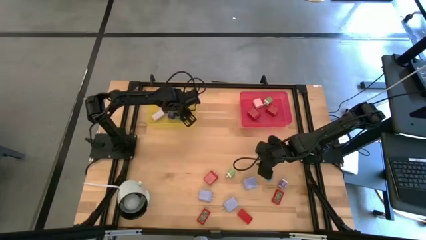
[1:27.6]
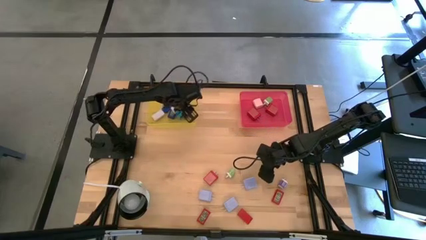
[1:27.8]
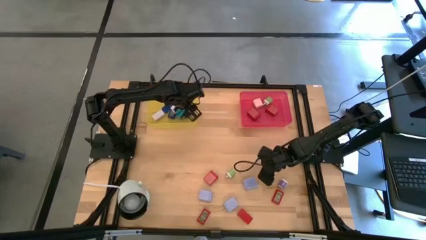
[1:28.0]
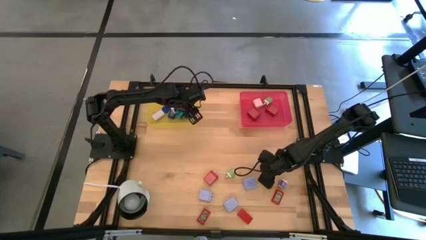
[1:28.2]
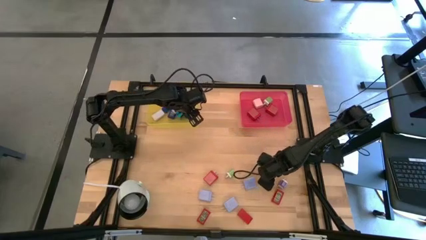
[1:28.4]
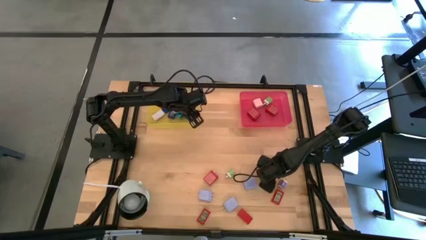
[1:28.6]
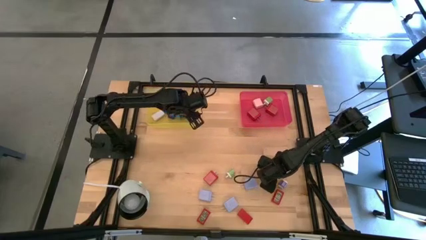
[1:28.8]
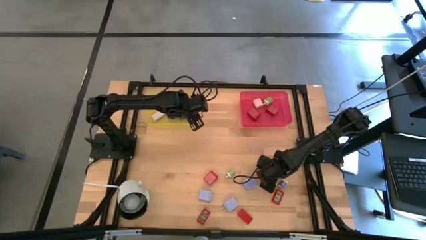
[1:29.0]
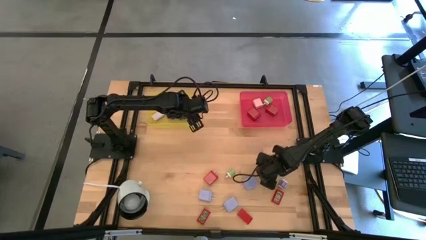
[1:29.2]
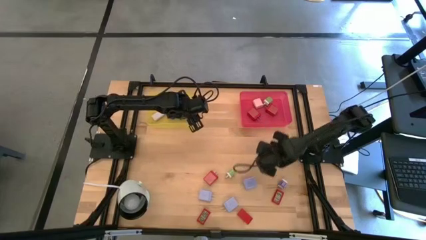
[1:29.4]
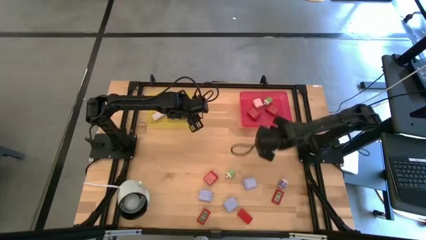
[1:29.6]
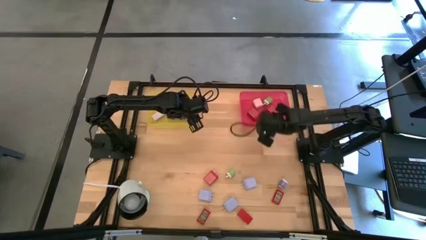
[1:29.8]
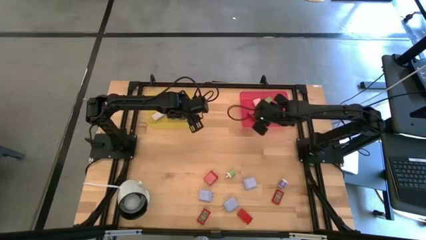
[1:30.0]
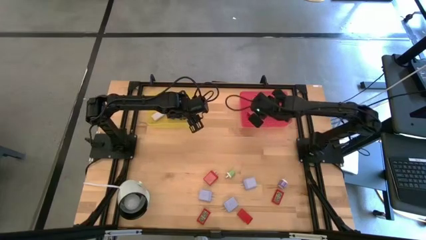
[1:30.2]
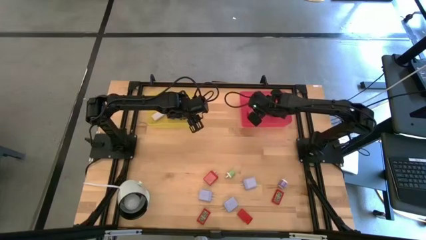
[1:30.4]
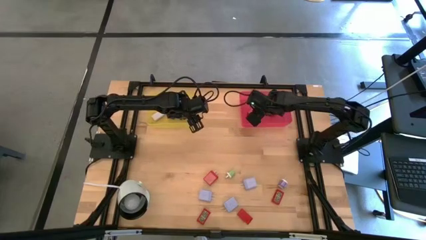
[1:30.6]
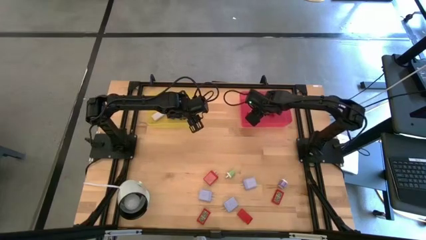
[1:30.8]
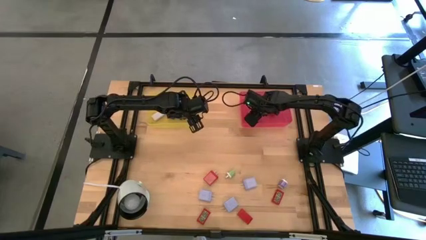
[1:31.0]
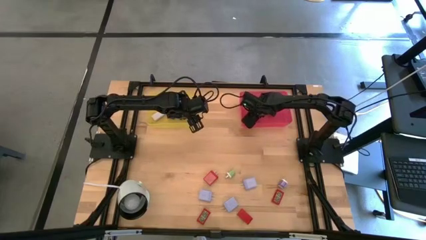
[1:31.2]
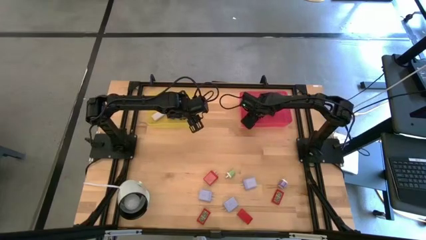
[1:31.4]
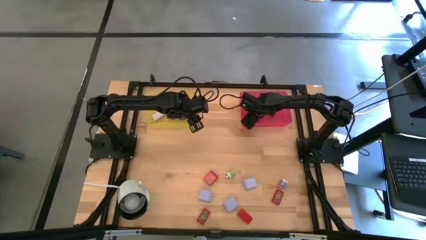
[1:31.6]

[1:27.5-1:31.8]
Task: Pick & Place Office items
Put the blue charger adapter into the red bin

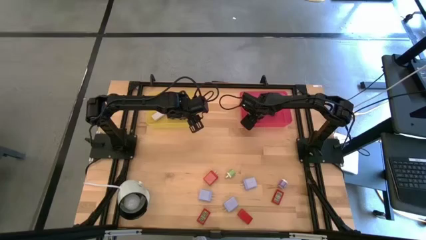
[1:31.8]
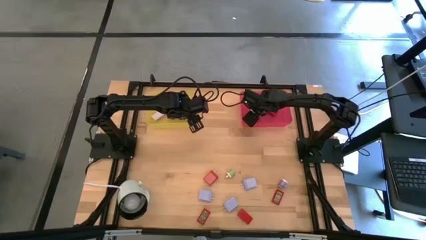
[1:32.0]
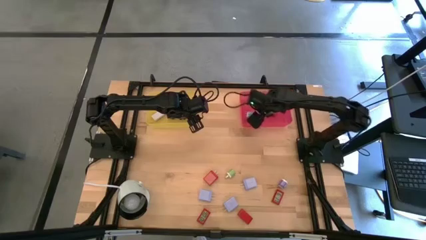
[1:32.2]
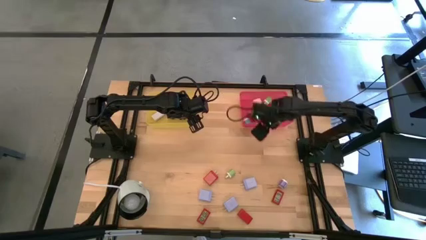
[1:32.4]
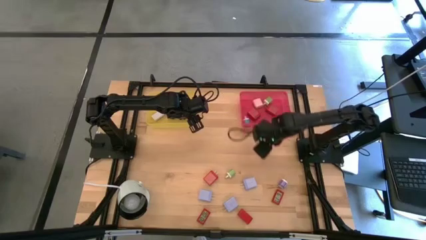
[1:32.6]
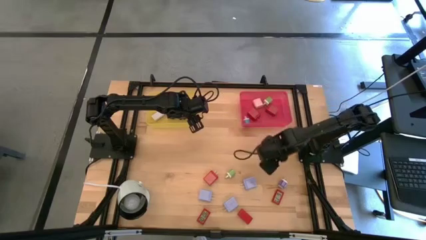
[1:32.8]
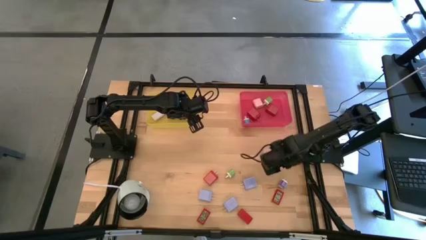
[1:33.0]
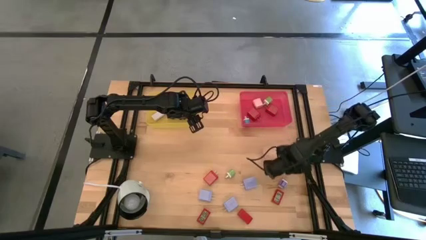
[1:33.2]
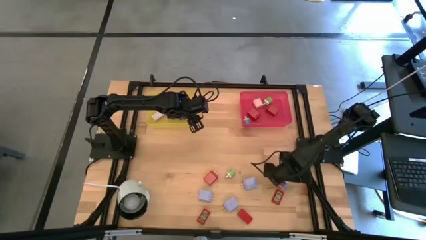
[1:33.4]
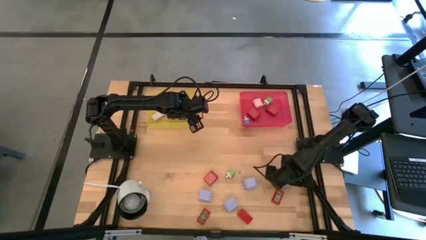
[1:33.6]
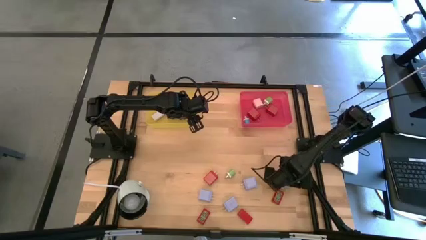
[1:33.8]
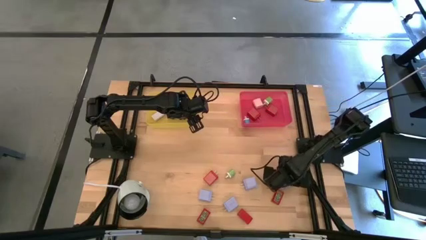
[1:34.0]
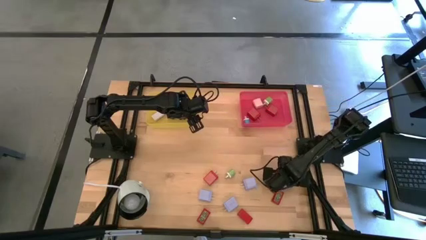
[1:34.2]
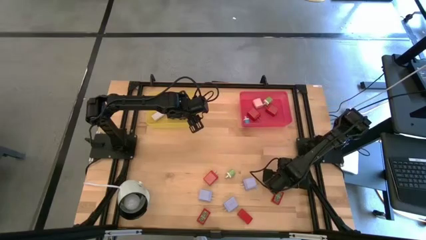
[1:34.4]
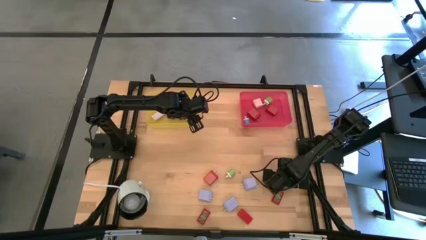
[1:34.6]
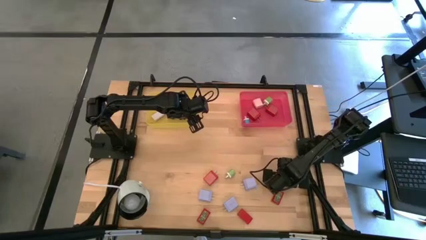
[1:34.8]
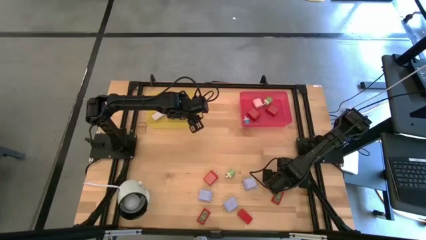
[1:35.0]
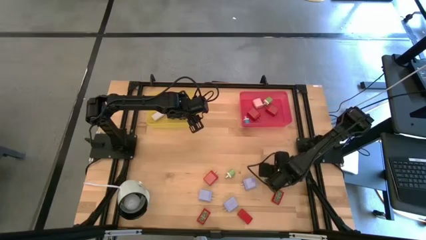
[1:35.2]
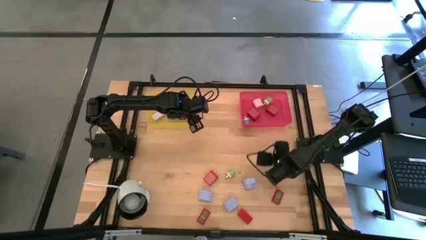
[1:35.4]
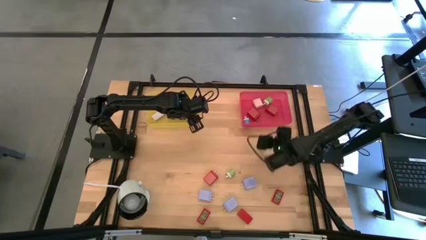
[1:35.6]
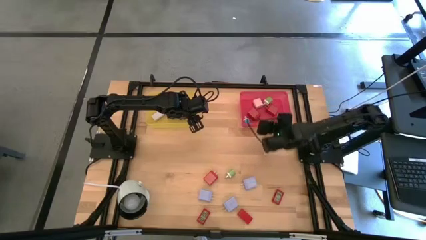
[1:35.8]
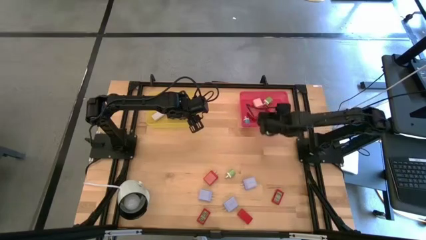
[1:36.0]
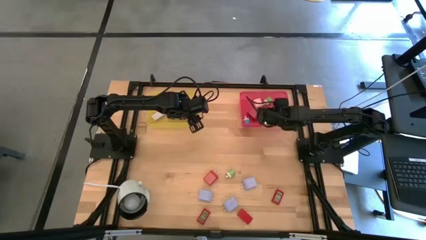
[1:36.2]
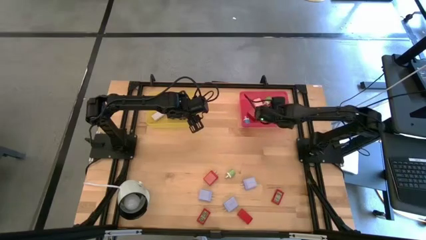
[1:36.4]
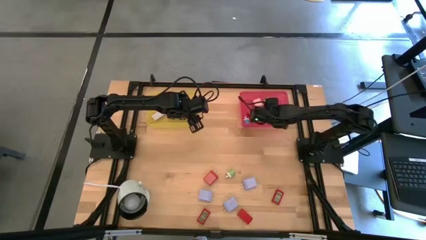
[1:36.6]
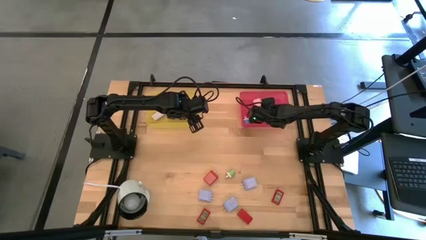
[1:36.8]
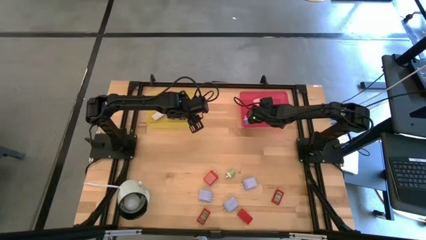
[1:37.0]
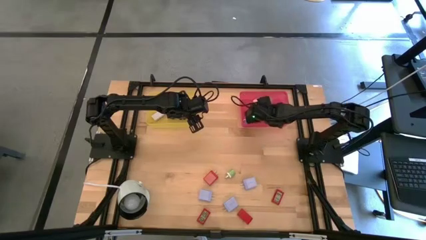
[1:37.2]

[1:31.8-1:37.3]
Put the violet charger adapter into the red bin

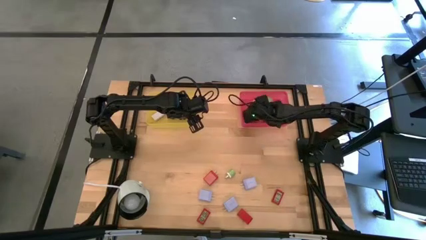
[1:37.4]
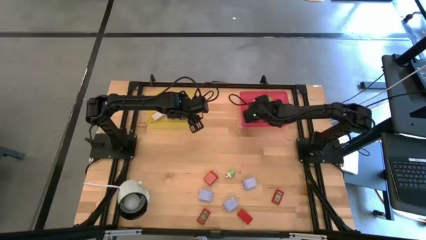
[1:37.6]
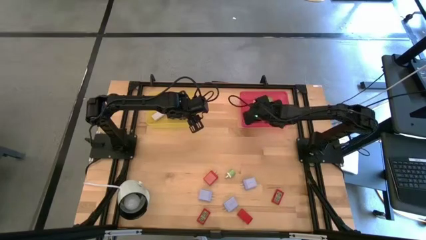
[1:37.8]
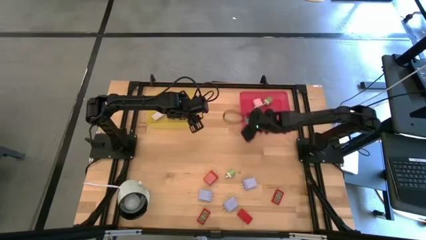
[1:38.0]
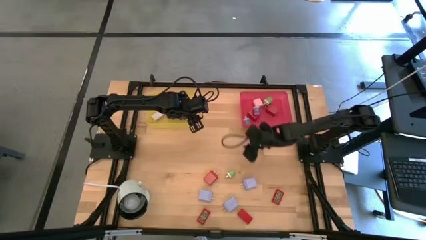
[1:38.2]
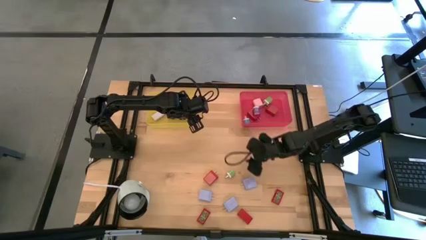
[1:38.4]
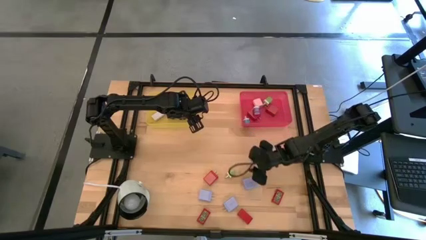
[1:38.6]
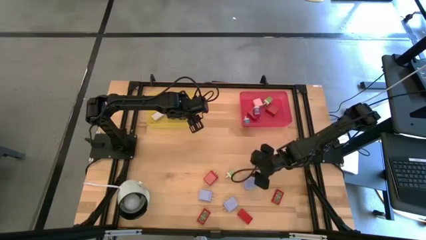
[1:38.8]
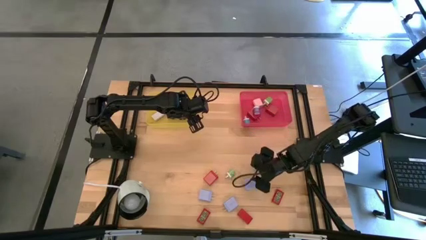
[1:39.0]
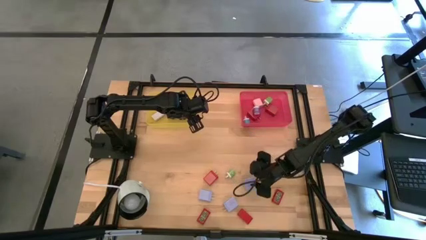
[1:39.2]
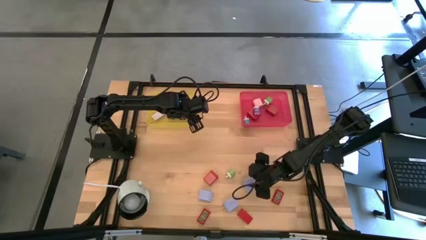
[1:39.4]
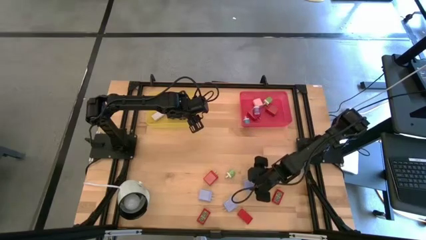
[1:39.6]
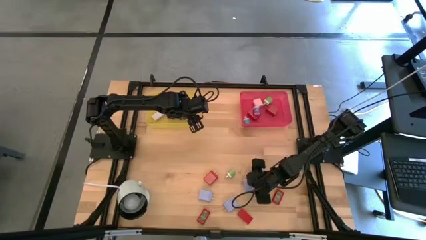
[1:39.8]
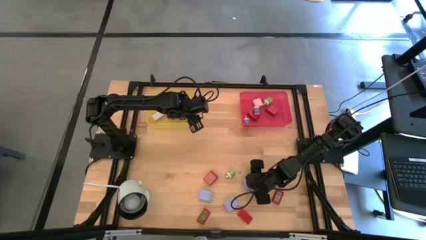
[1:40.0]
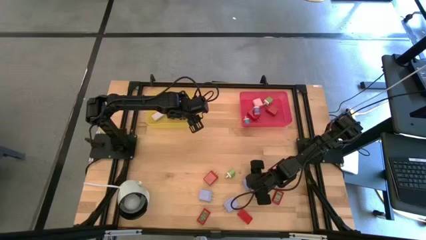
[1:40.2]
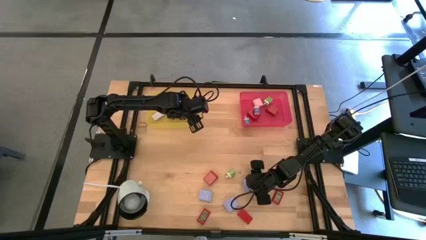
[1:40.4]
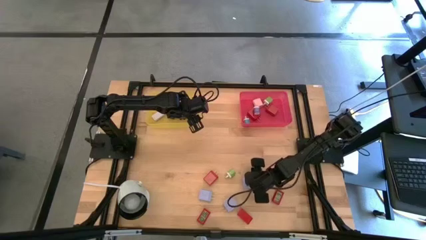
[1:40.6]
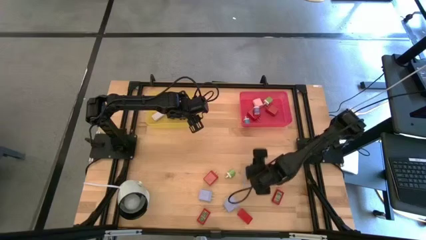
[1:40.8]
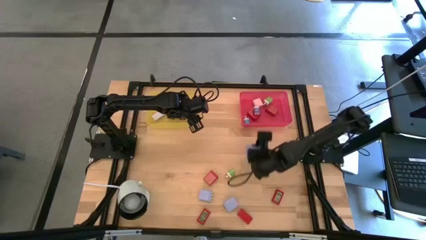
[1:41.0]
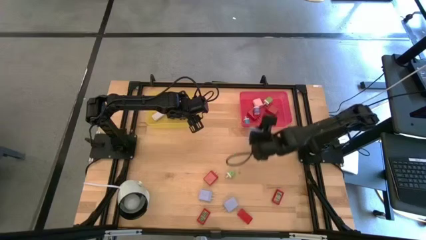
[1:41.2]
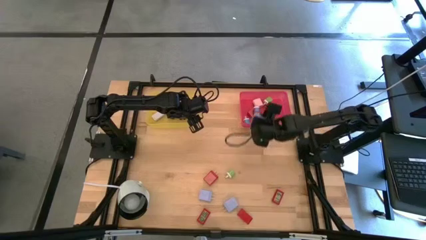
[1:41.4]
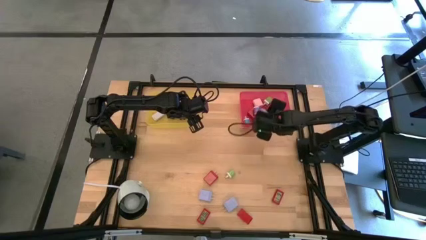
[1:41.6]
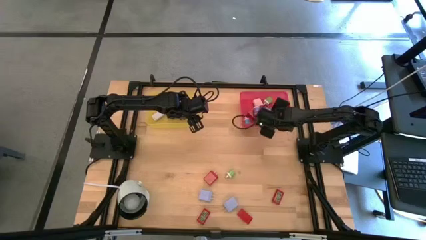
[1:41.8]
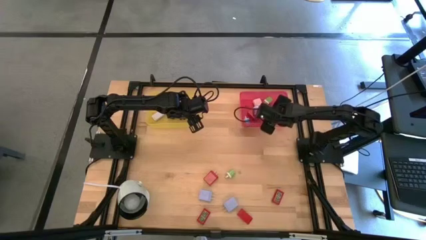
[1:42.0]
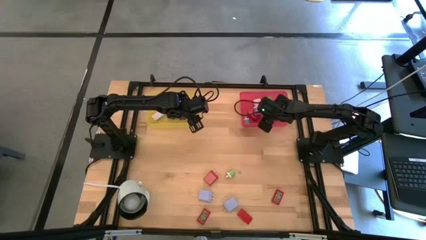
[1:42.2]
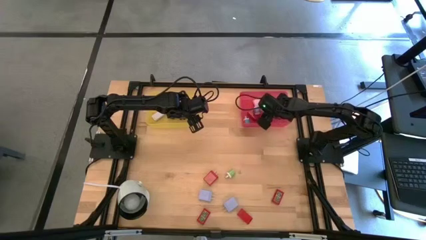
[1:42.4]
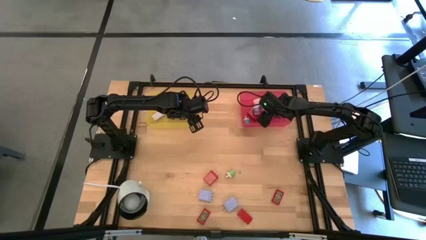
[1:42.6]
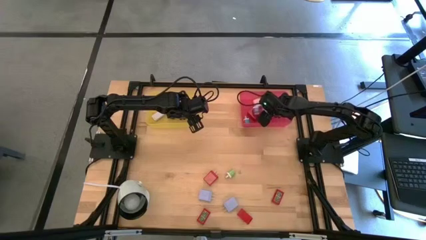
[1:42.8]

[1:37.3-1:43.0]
Put the left purple charger adapter into the red bin
